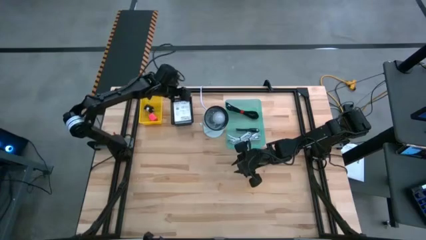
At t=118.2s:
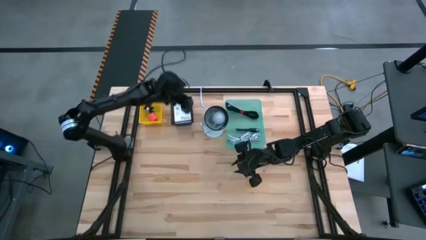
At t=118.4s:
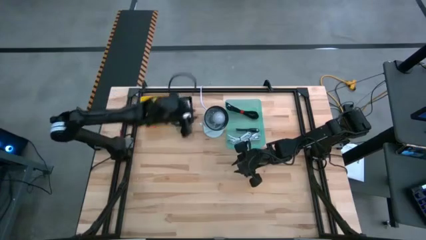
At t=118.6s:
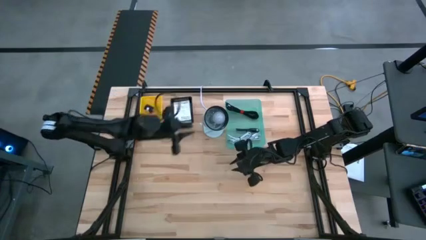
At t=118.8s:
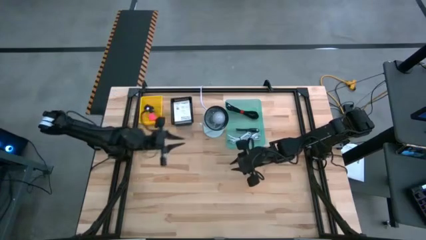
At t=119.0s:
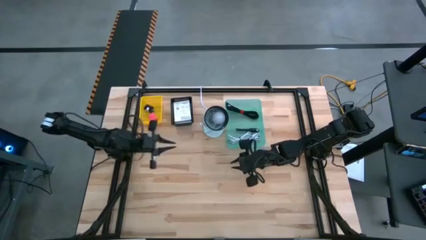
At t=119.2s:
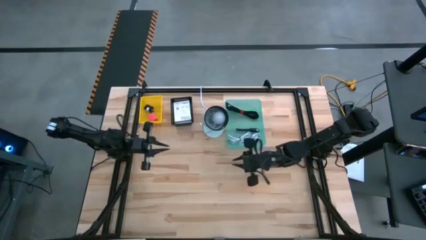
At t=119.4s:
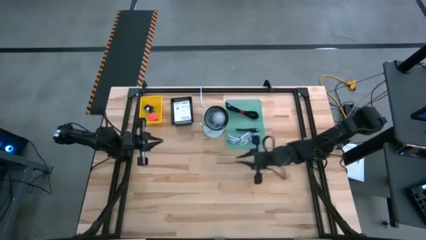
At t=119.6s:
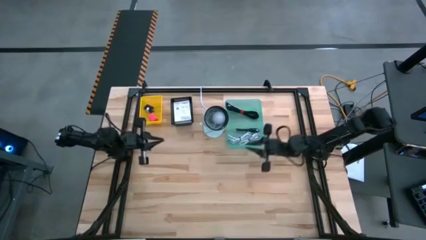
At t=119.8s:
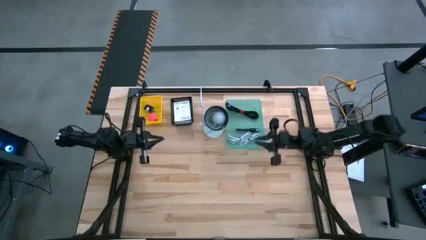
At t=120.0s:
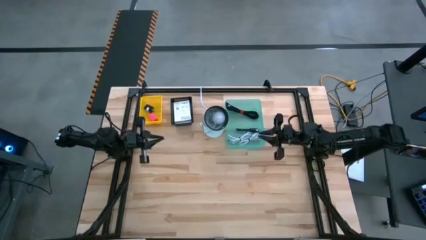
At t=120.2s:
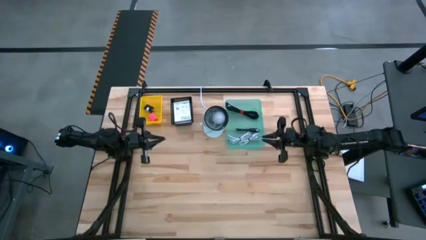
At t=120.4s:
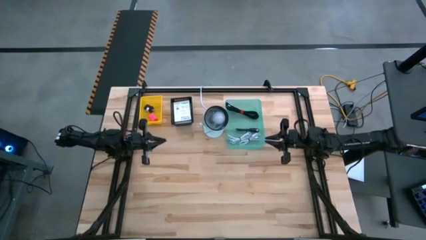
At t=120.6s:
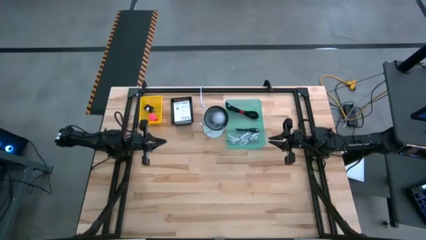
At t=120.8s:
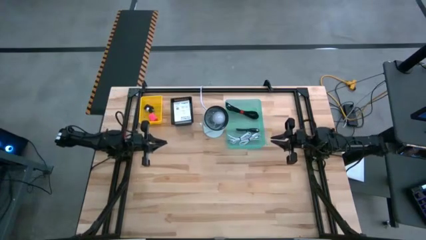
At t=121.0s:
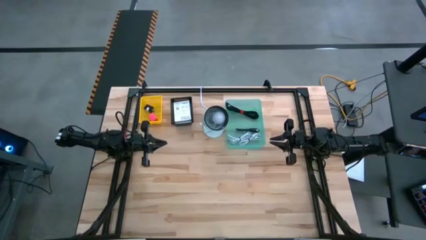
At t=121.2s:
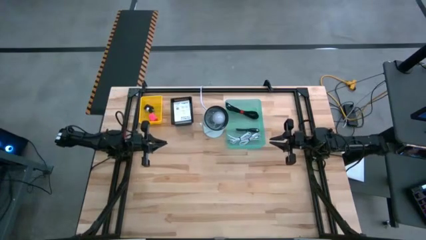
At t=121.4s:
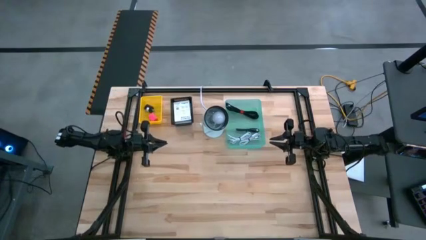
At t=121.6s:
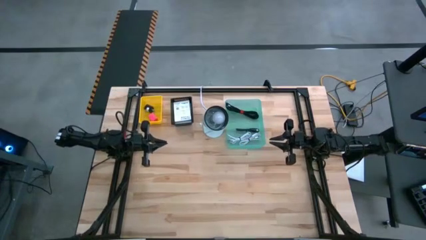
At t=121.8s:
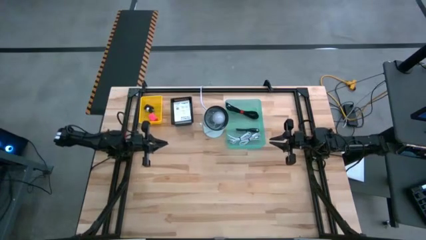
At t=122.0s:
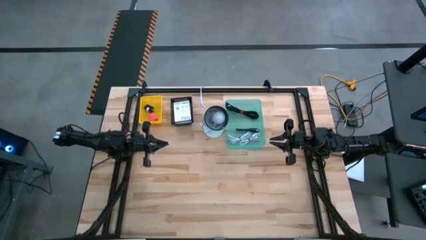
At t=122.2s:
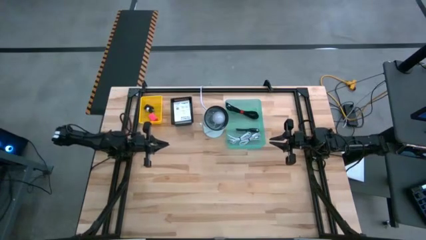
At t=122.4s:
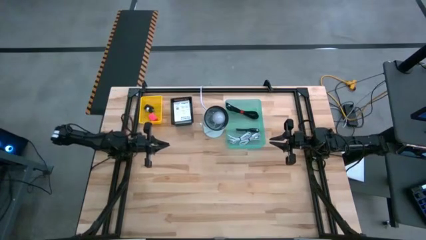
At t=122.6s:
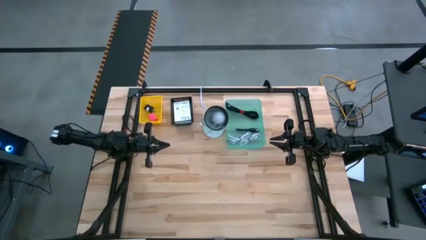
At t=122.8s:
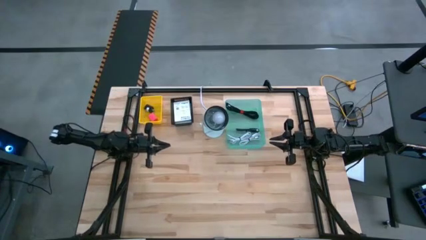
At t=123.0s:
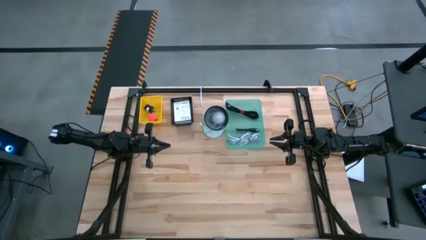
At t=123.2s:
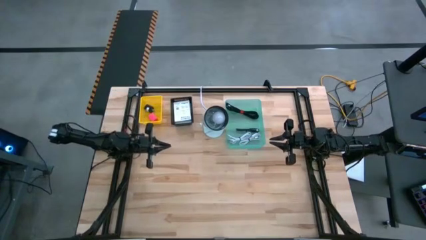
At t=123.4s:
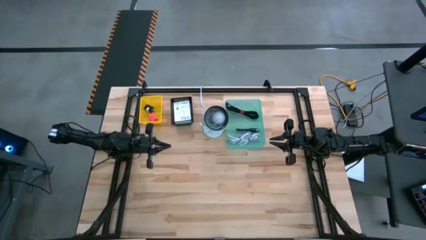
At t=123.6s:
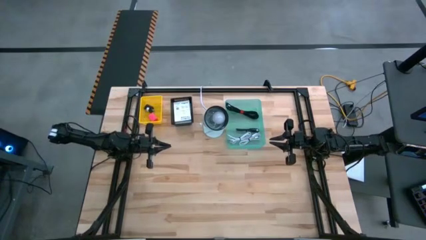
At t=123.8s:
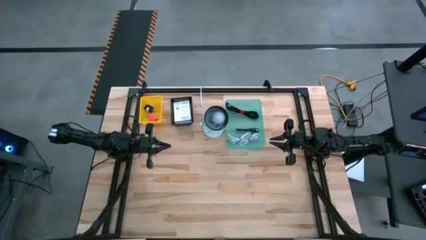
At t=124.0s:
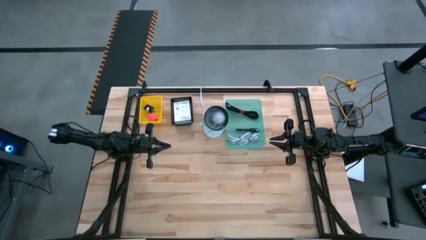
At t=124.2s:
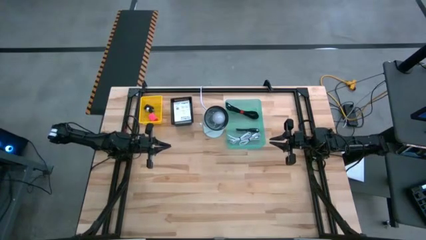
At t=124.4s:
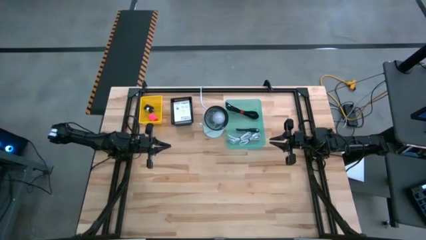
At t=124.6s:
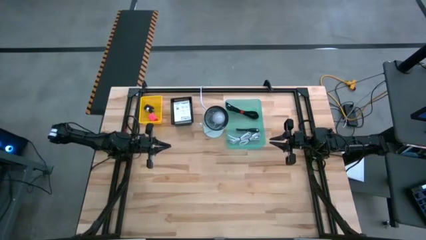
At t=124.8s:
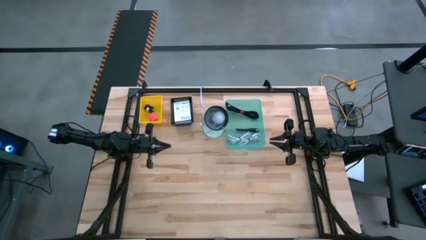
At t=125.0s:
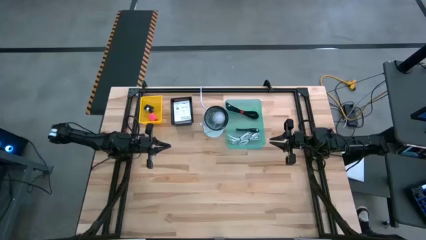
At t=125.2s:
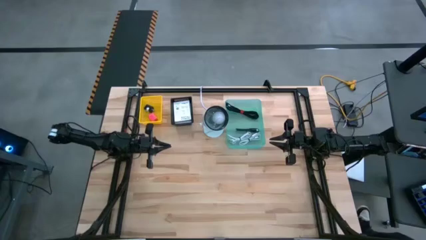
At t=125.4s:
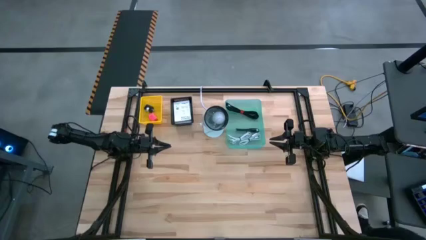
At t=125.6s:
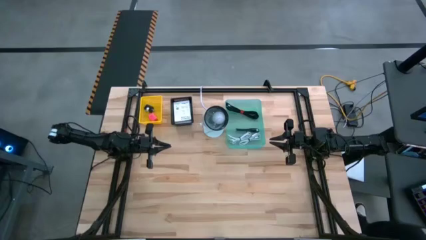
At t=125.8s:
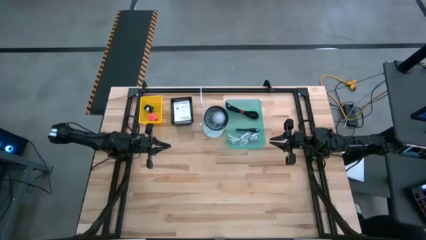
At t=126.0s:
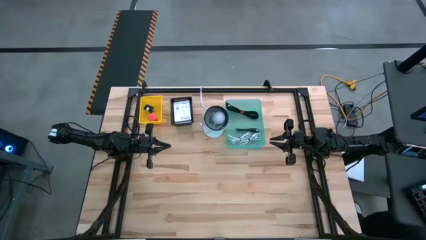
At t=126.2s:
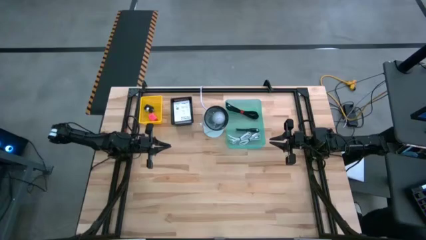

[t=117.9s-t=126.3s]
Task: Pick and place items into bin
Return to Home Position

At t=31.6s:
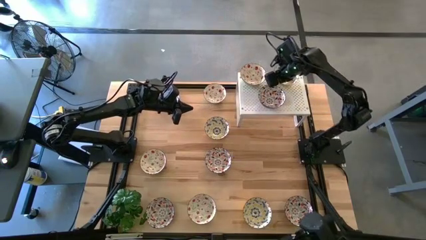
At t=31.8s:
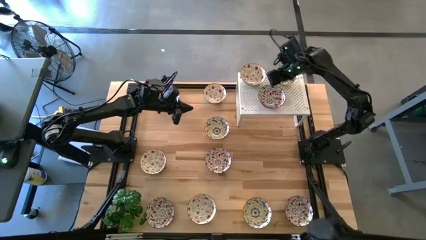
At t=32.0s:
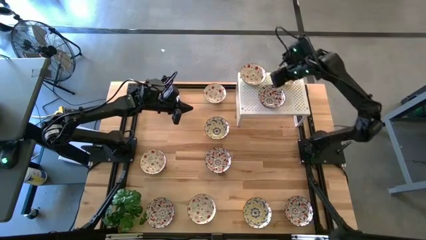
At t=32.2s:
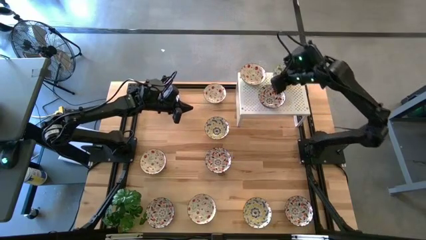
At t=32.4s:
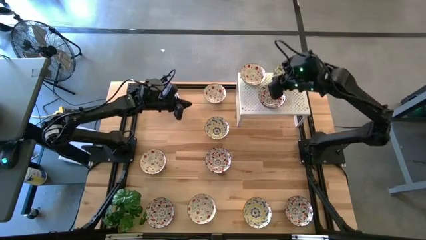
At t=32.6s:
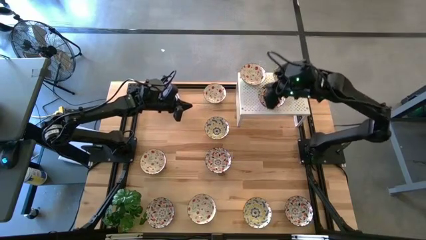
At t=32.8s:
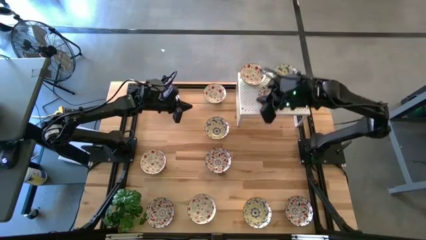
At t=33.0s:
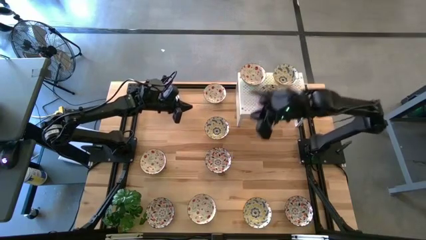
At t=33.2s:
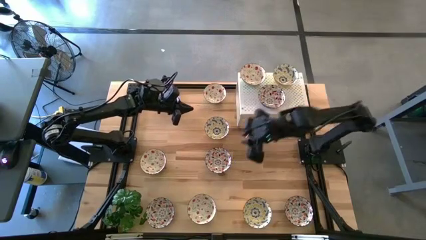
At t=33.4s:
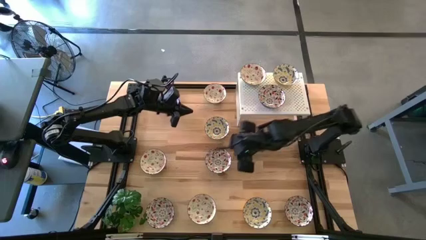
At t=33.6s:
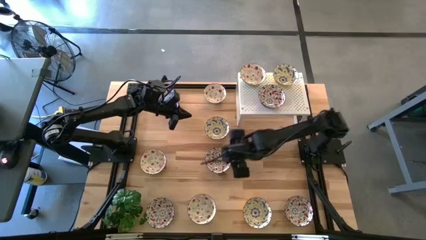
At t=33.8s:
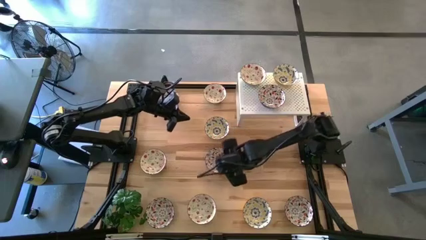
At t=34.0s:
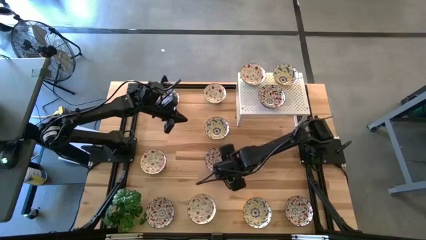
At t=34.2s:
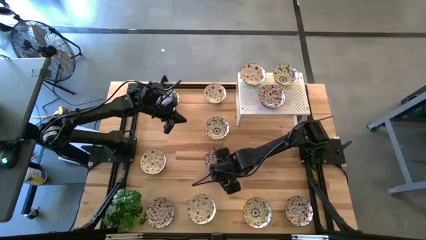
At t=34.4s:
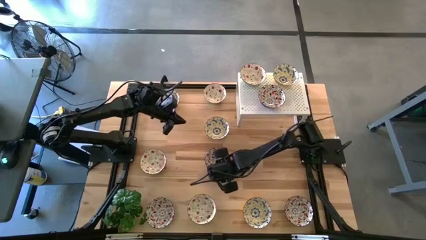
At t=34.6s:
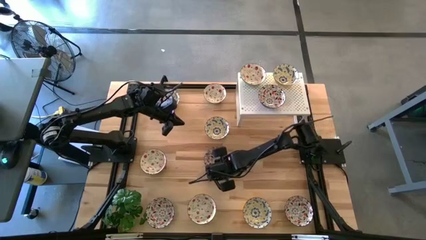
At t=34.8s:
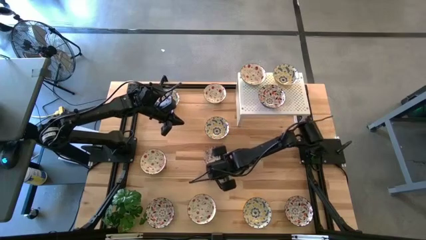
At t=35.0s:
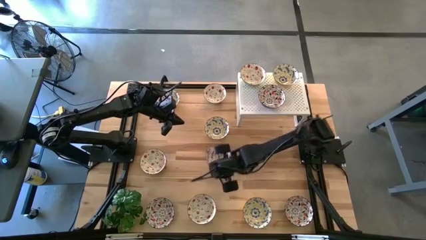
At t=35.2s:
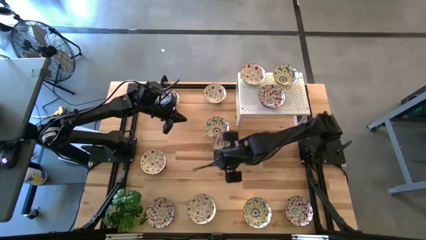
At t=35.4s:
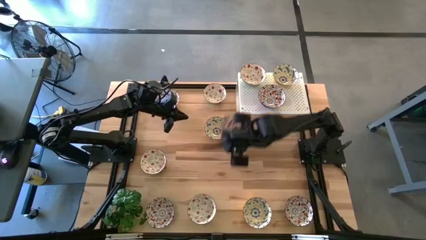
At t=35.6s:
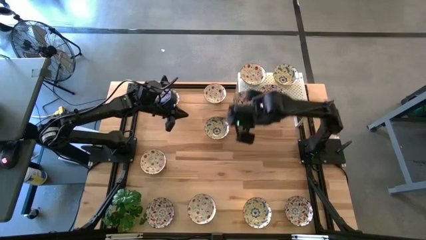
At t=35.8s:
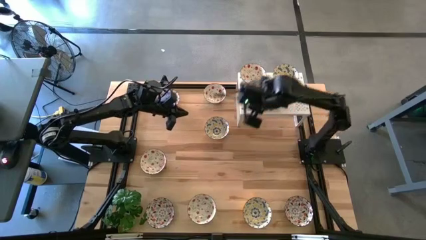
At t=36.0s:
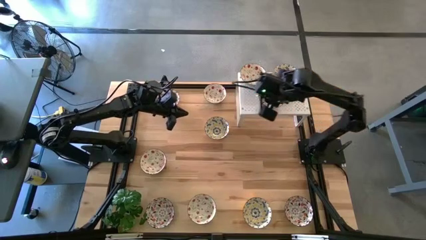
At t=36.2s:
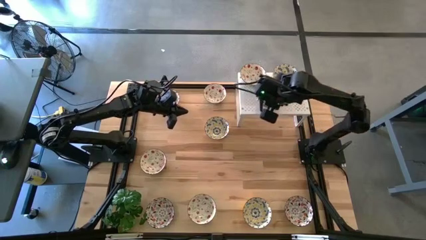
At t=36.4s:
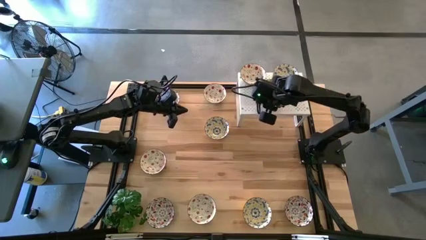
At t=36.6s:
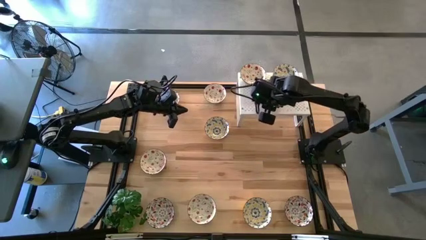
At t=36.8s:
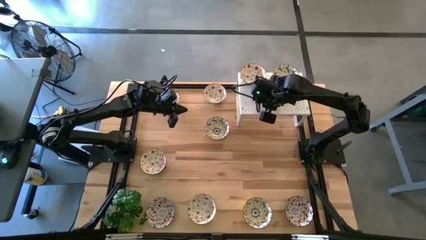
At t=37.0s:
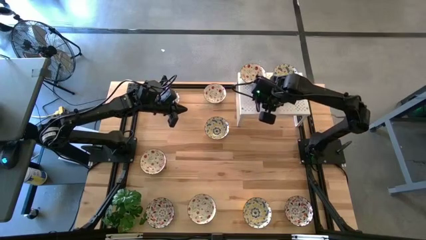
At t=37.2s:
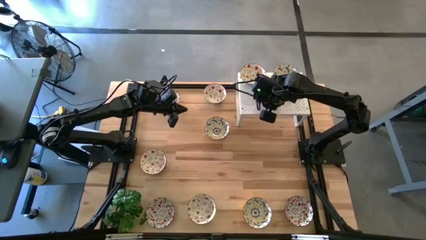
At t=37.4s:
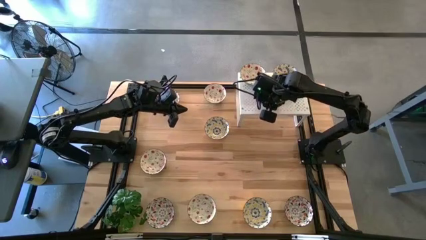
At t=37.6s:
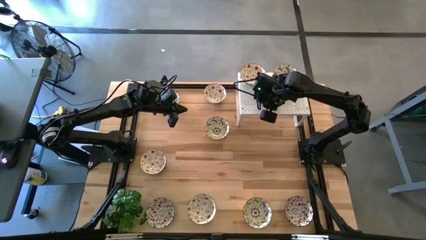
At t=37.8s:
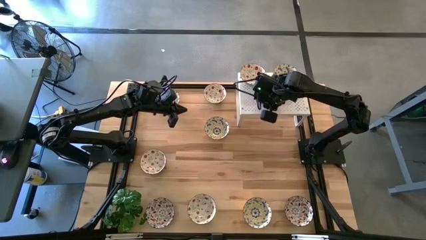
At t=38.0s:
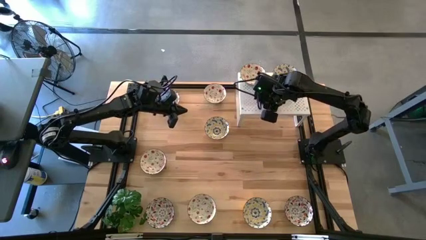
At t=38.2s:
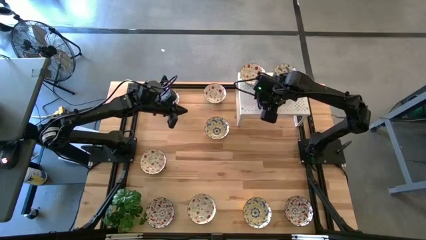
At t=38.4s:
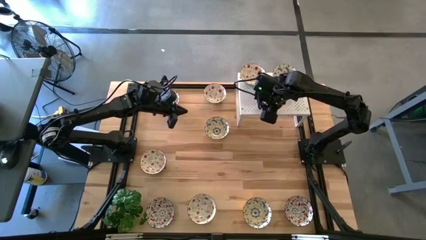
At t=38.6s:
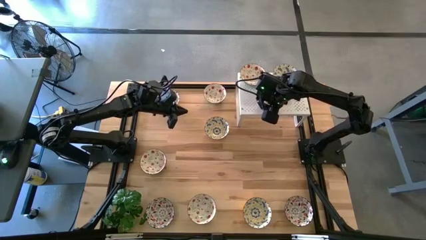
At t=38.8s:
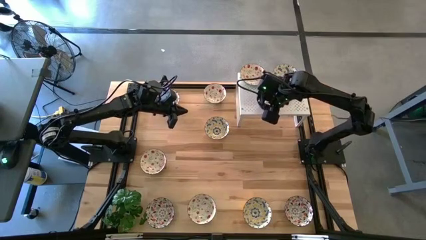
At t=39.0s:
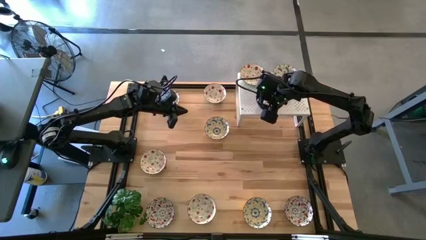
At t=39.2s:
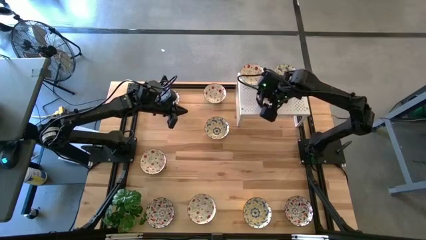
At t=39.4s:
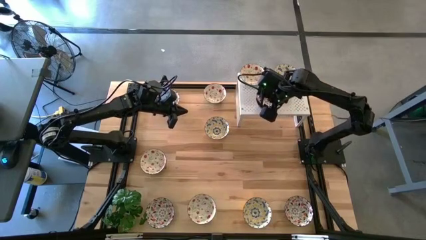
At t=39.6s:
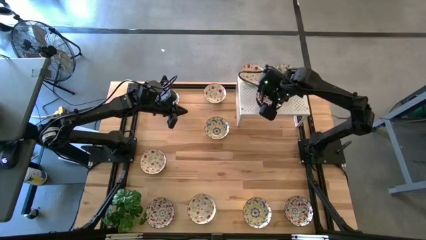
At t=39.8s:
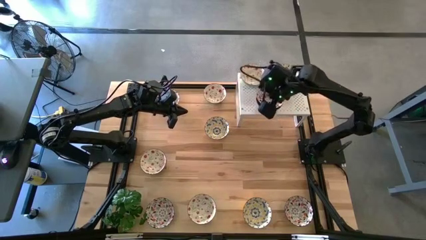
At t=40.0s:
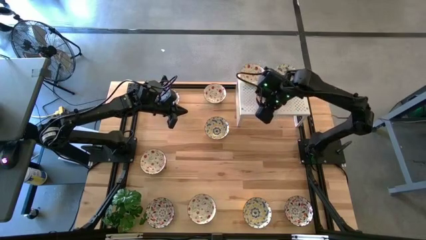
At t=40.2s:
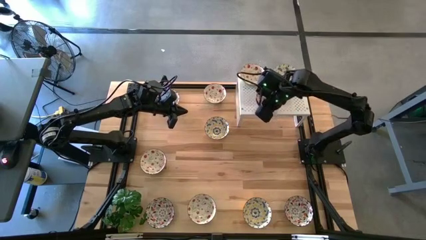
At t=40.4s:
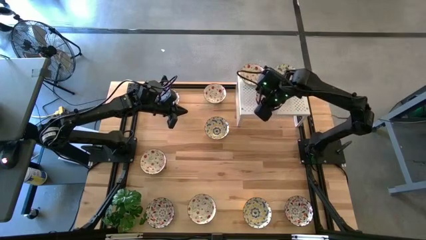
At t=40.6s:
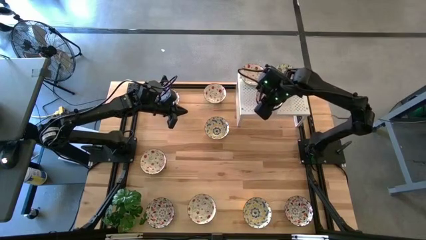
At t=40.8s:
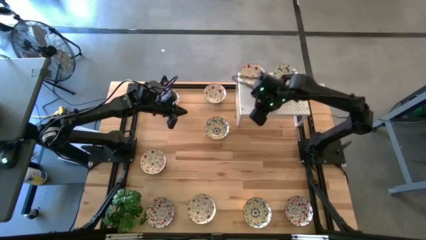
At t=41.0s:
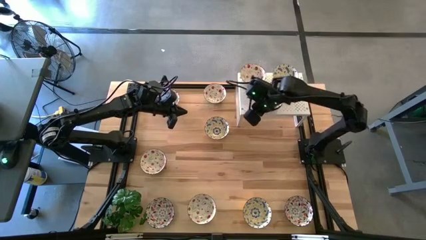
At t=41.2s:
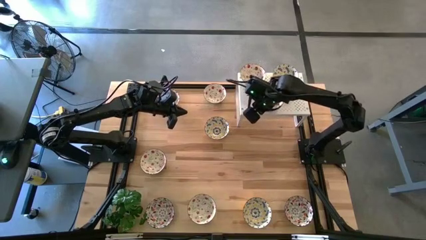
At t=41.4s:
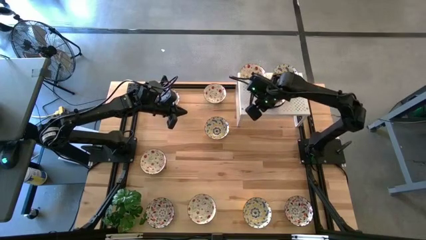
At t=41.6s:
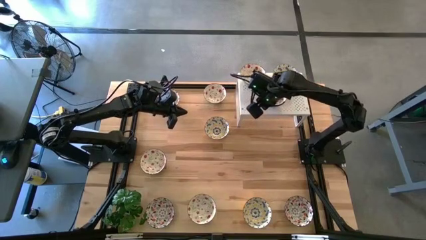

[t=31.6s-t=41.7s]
Task: Pick & Place Mini bowls
Stack the black patterned bowl on top of the black patterned bowl on the shelf
